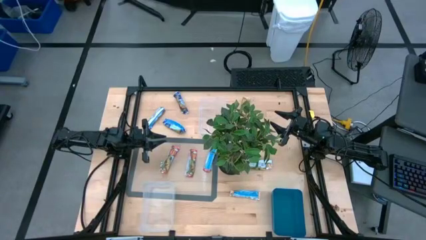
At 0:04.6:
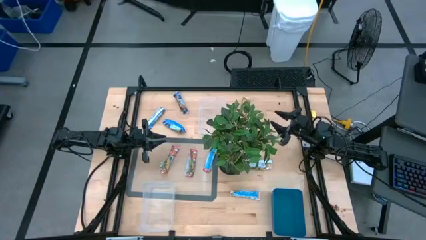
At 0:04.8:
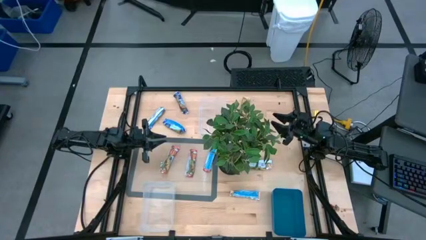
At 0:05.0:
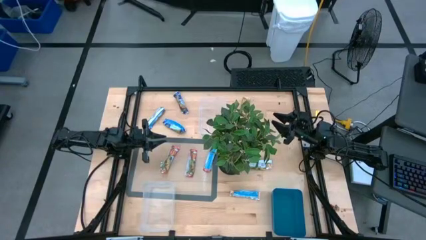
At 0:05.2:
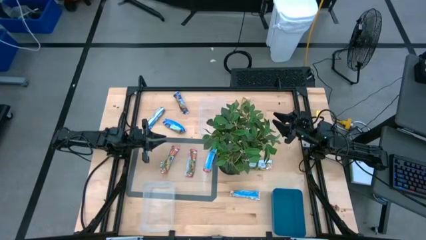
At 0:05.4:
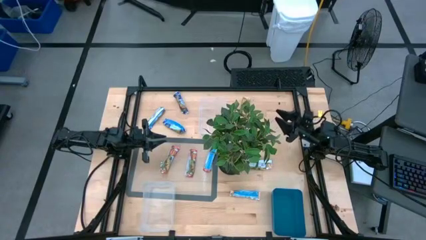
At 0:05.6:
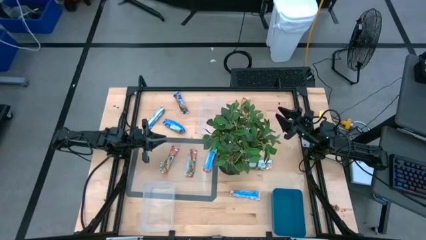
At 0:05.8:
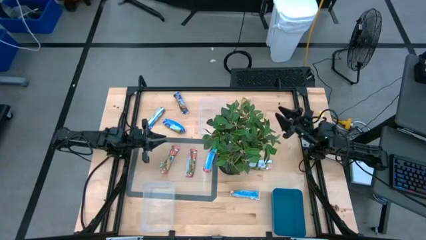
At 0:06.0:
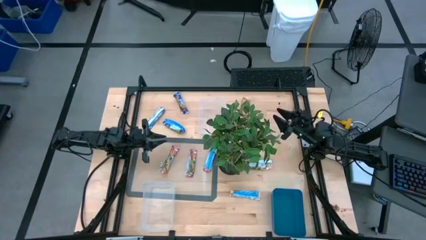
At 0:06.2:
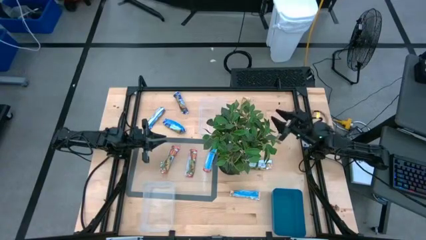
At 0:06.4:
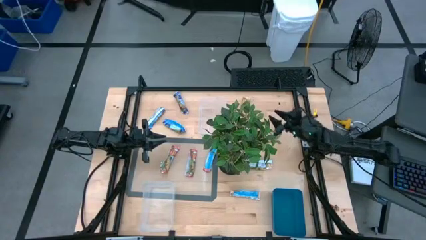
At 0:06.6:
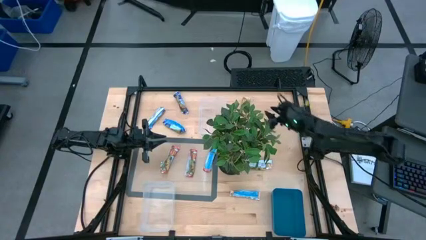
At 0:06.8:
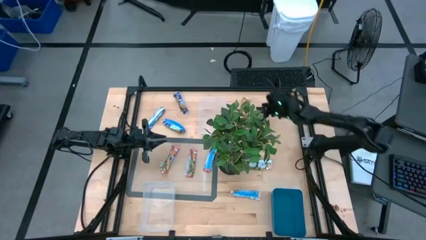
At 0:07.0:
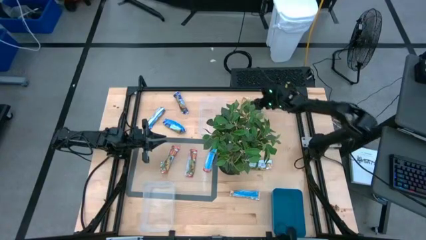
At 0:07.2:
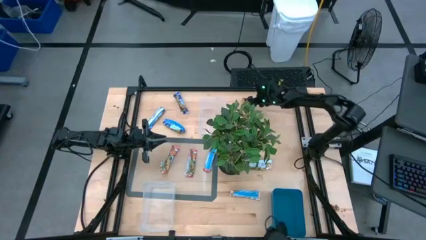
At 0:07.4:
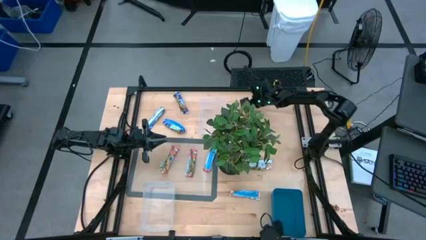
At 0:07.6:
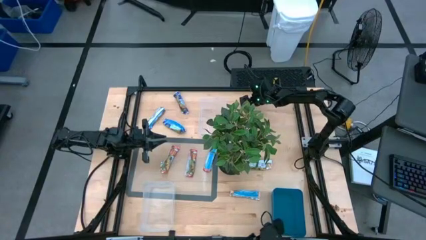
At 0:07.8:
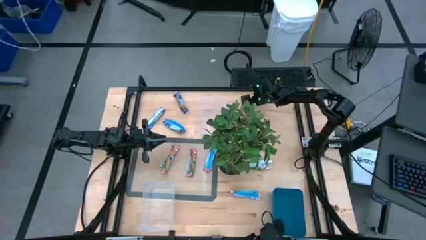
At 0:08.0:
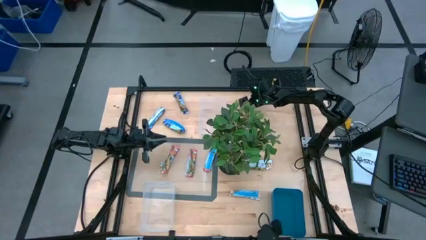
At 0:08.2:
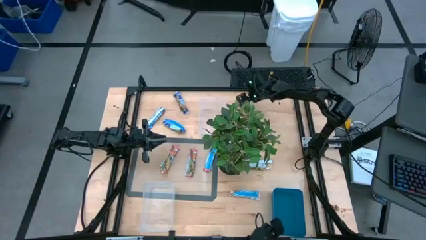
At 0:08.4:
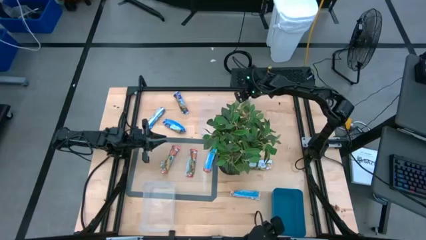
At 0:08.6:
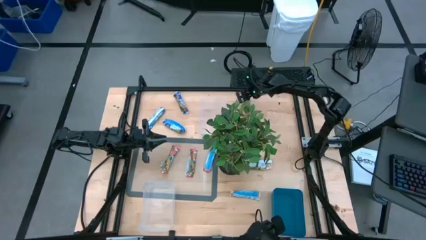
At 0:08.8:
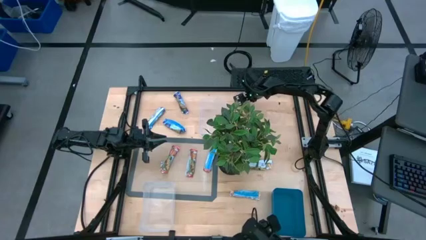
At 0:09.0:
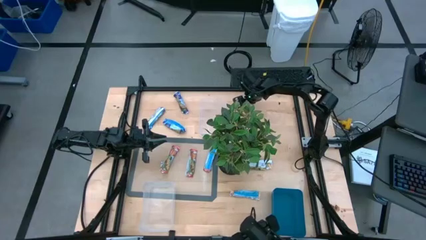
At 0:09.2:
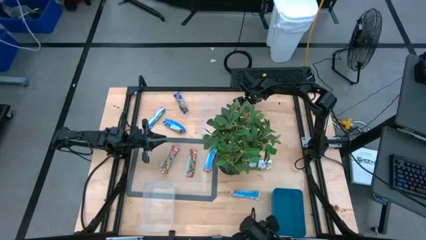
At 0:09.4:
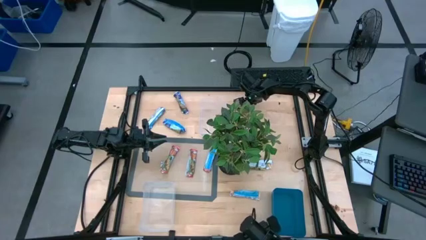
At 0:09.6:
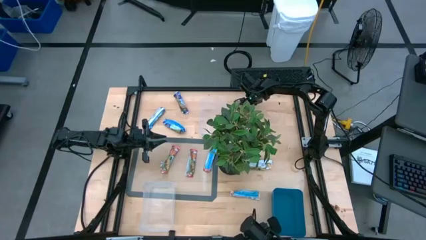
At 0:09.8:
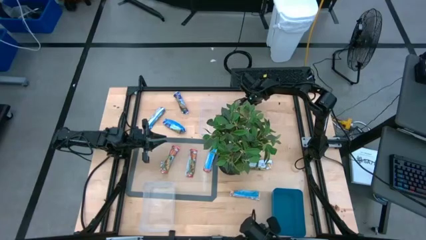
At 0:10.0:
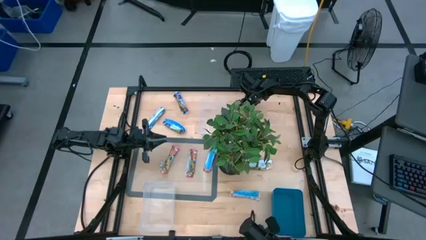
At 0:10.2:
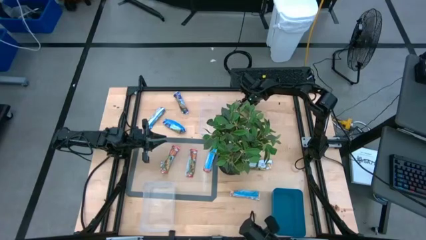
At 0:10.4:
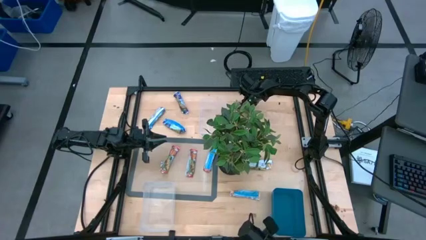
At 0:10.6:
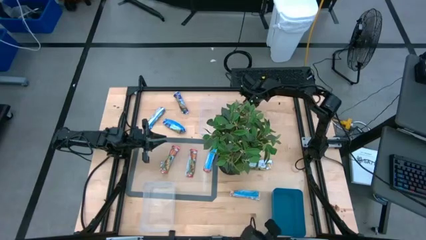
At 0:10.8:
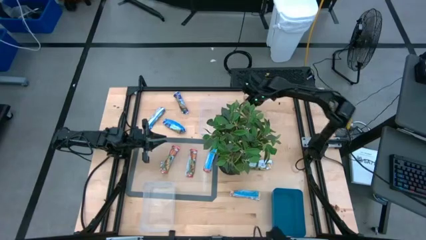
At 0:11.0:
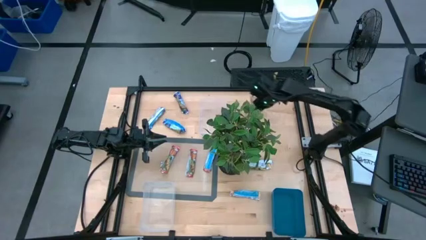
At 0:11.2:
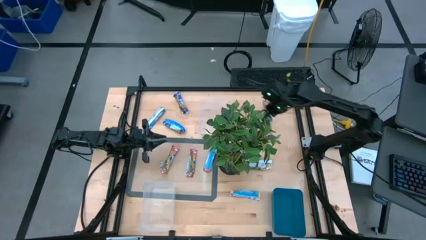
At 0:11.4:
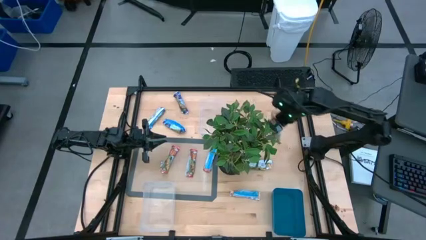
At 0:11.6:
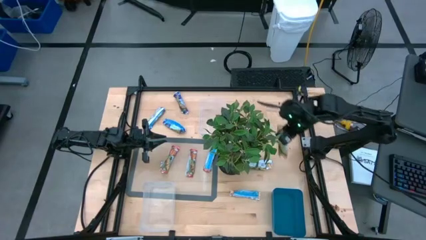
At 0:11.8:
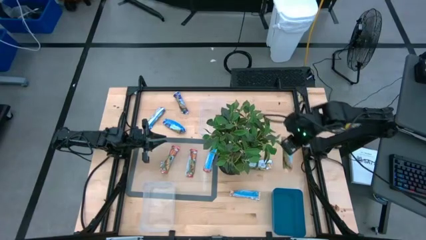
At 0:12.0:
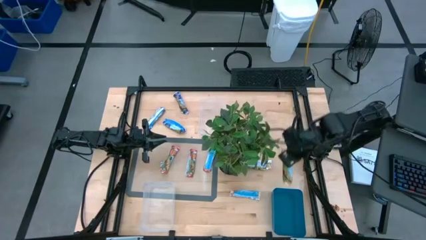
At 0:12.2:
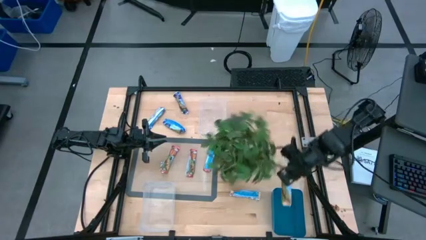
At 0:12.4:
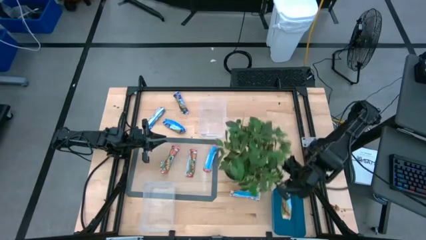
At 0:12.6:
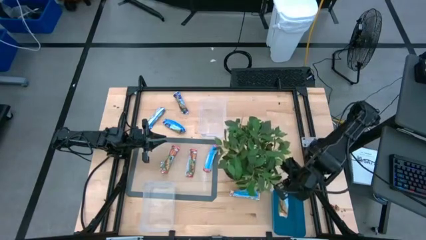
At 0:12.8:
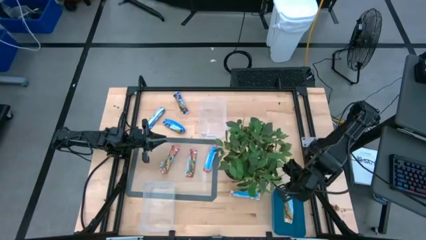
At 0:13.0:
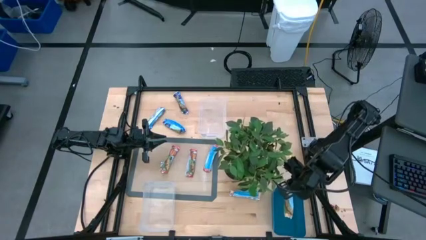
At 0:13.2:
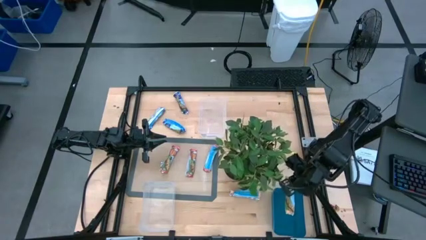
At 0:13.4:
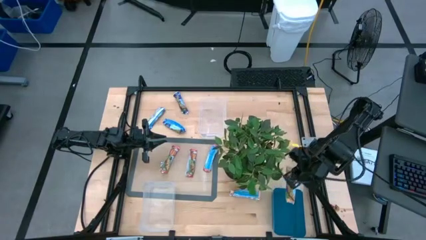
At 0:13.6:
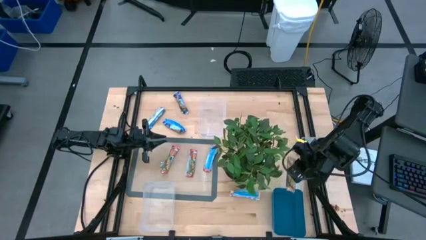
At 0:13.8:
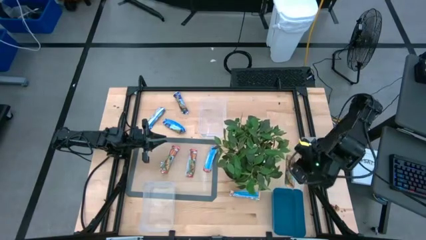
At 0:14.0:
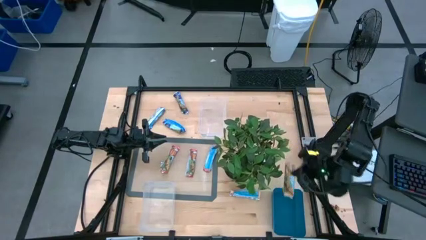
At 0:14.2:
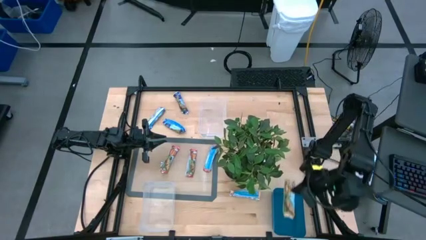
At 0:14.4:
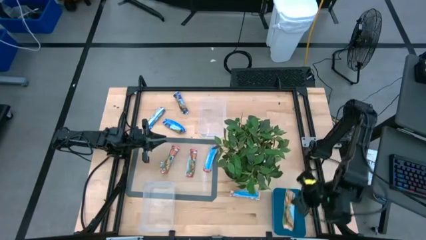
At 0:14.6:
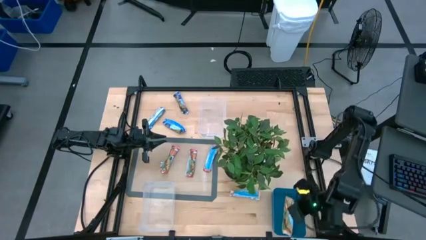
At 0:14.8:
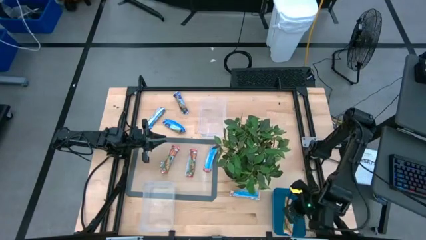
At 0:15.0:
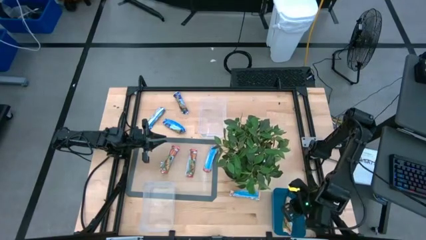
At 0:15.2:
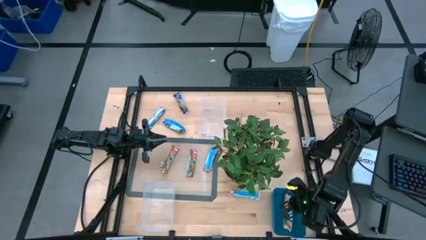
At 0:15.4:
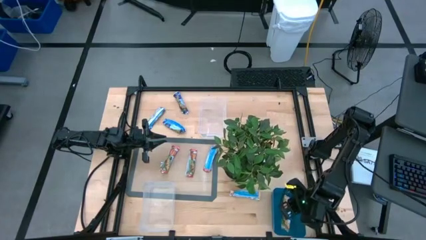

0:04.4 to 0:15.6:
Task: Pick and place Granola Bars by type
Put the green granola bar into the blue bin

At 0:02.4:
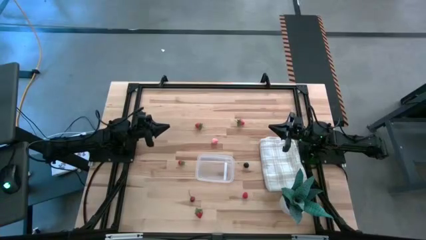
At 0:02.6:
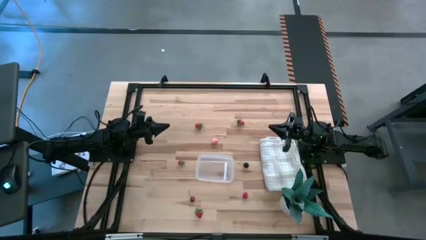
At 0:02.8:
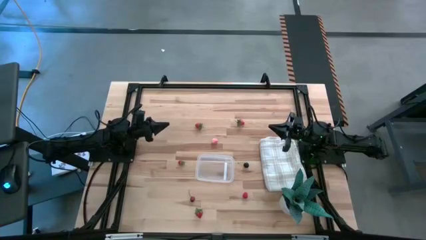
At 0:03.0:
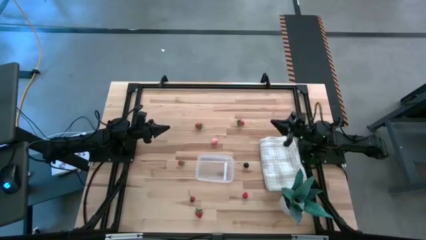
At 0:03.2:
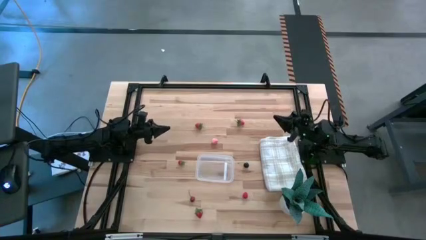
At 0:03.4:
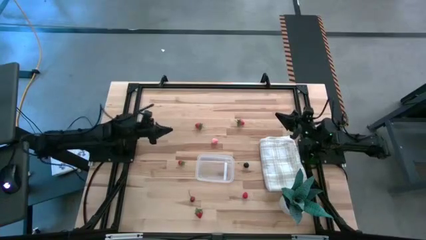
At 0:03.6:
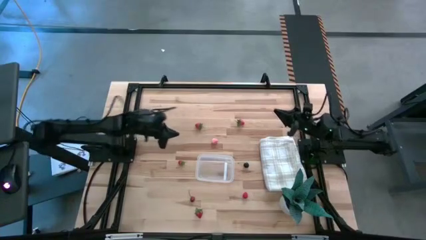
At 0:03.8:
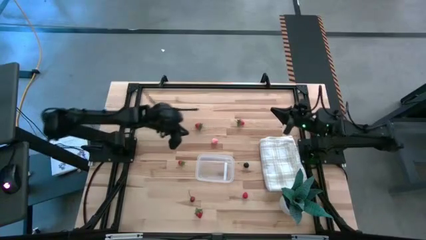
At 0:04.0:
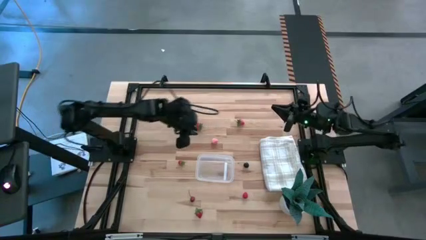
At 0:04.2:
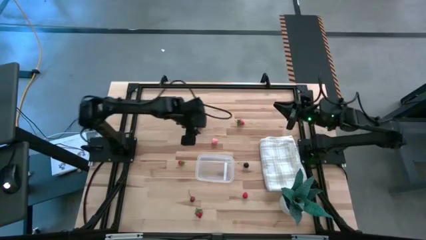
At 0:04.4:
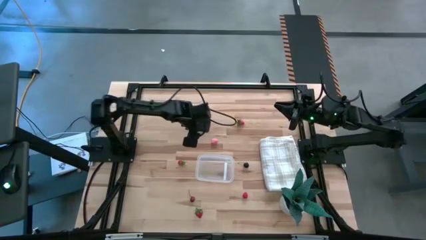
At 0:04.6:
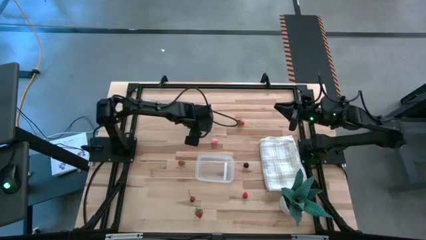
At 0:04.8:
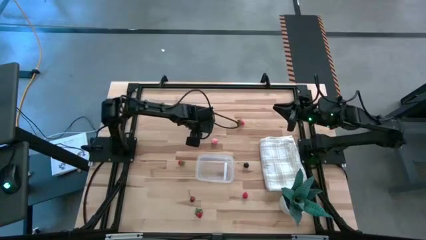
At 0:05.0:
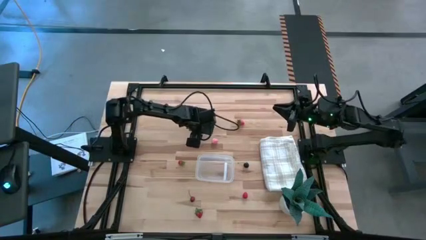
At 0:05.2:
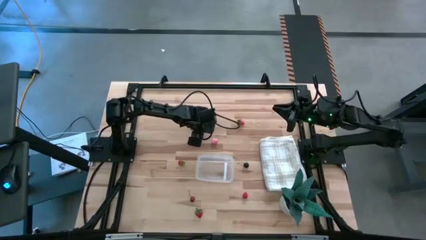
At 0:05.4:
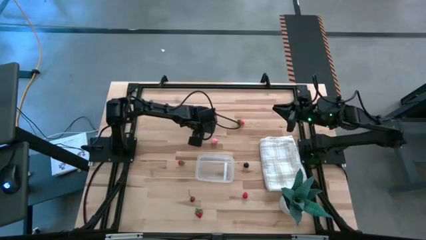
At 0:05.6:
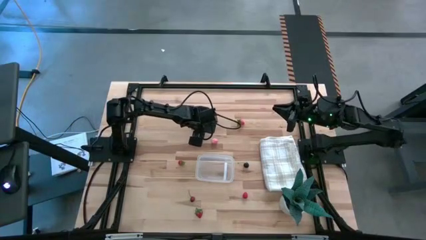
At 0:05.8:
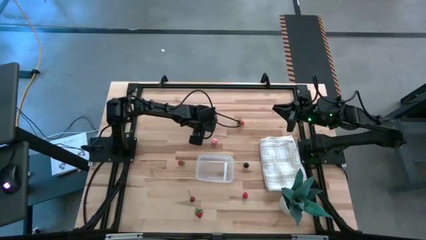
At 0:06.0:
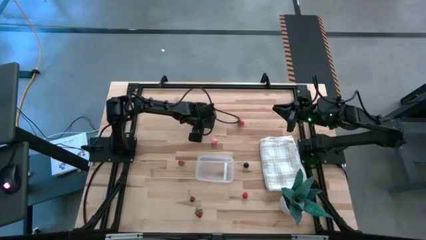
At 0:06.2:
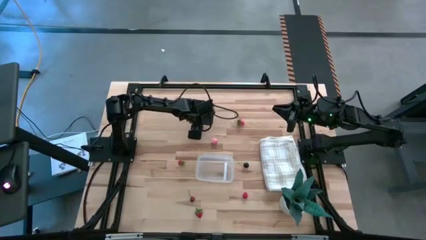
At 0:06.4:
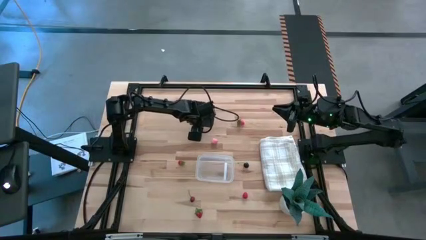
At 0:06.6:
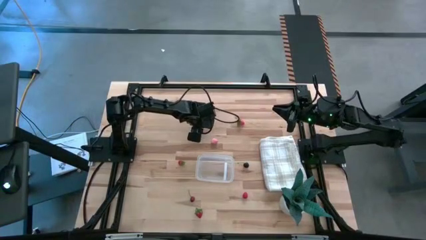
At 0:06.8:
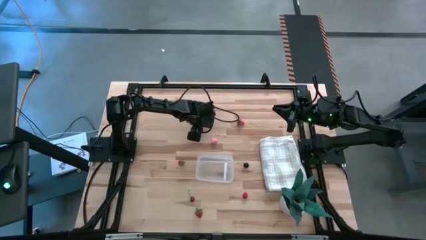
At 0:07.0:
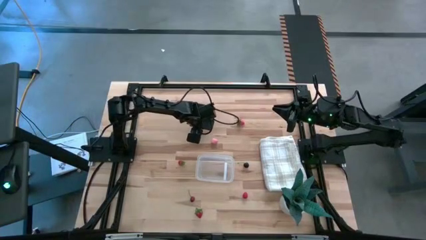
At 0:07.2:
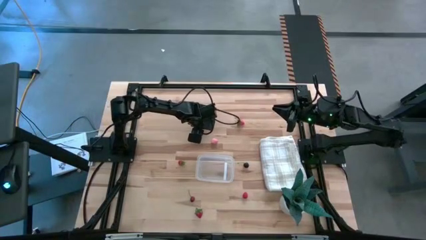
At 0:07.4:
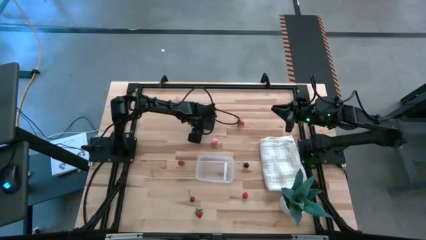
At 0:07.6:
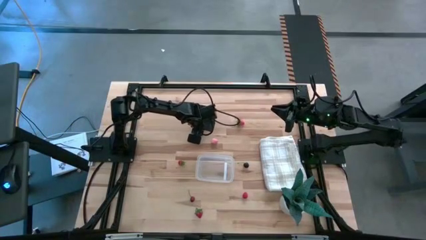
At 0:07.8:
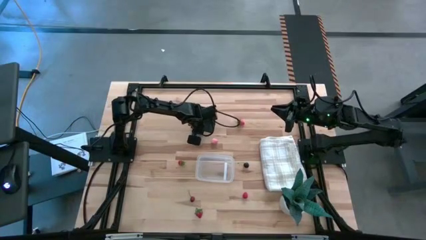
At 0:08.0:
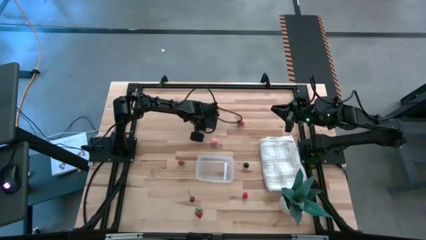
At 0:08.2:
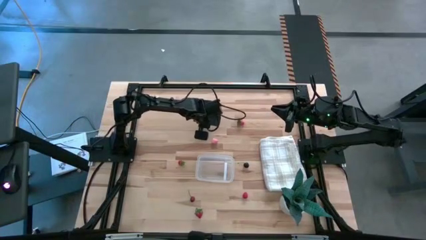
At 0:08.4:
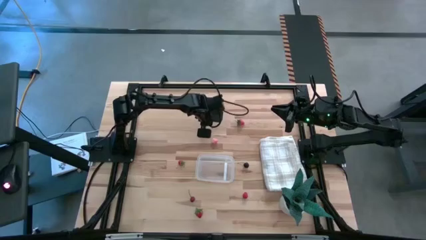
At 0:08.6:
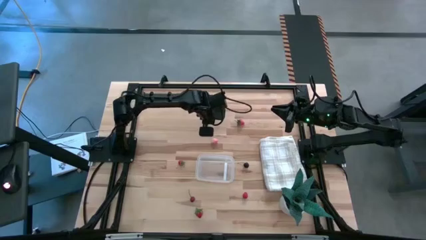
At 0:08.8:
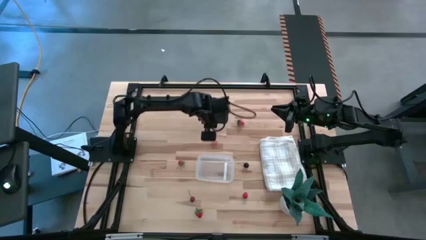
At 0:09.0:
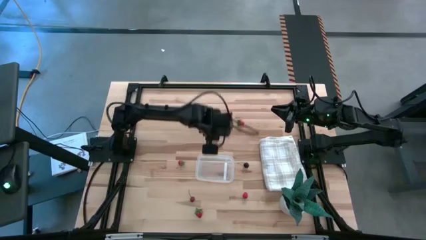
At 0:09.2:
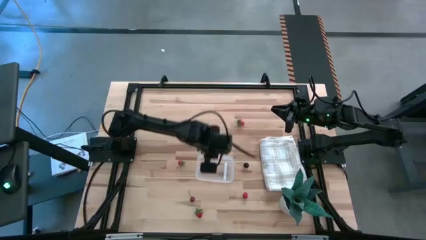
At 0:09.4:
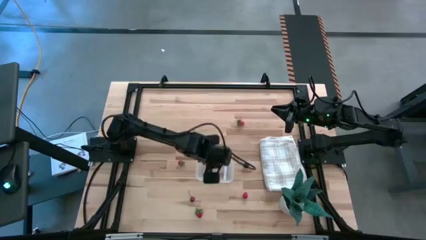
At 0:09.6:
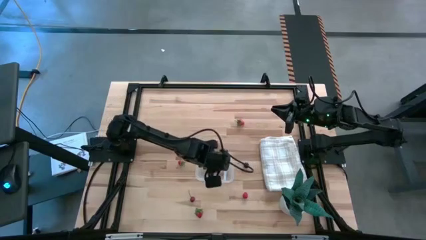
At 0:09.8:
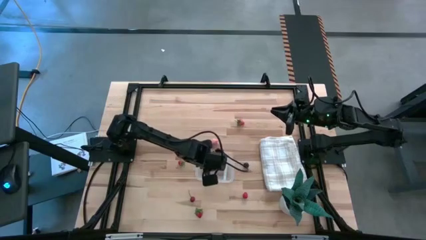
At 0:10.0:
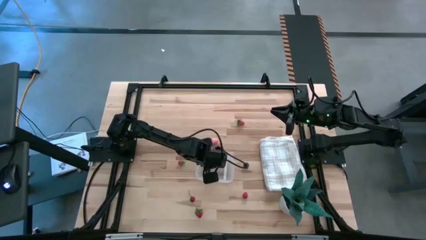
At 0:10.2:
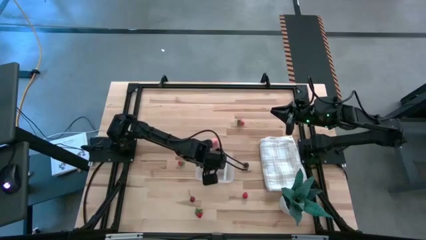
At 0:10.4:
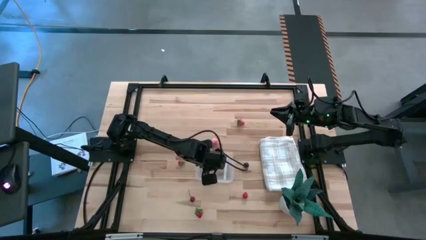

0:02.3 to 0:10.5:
Task: Pick and placing Produce into tupperware
Put the top left strawberry into the bin
